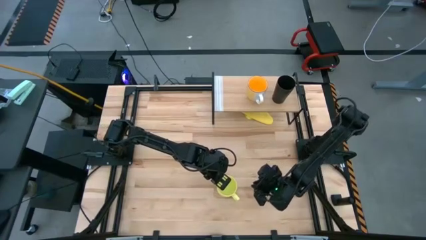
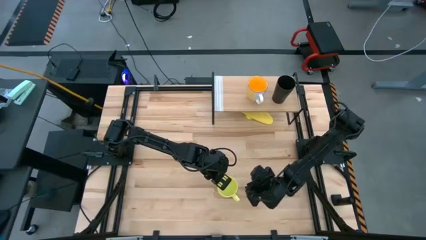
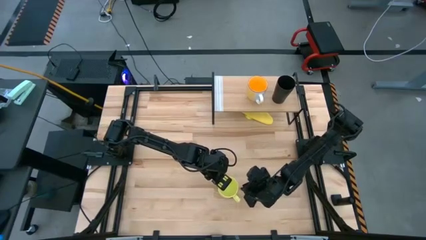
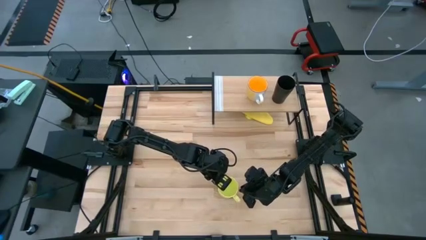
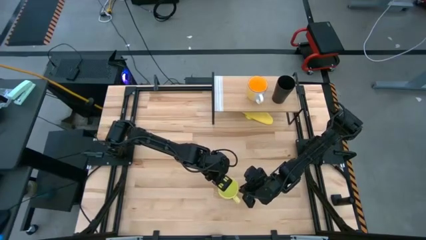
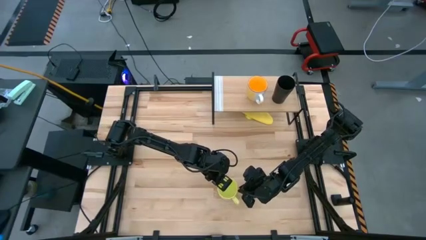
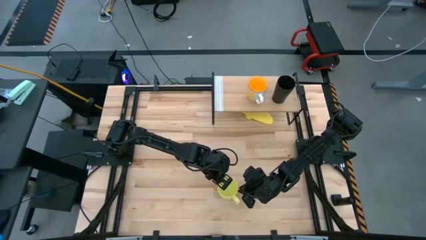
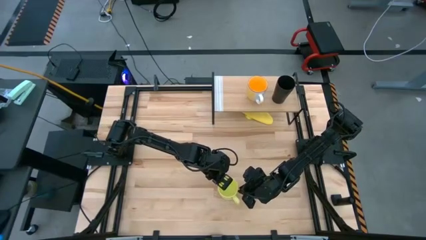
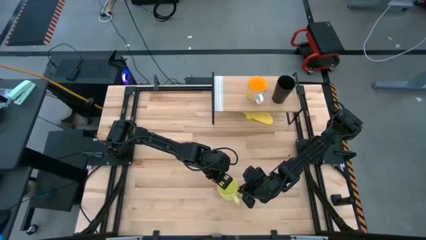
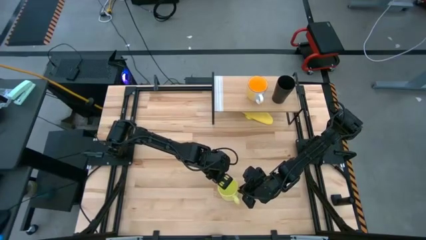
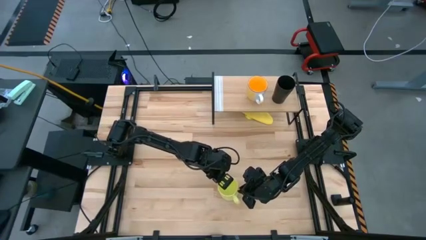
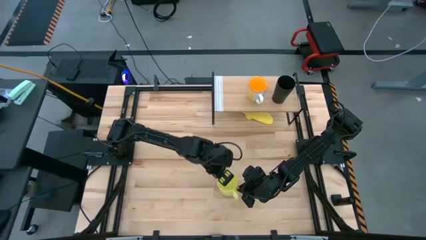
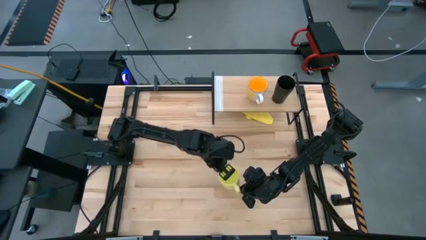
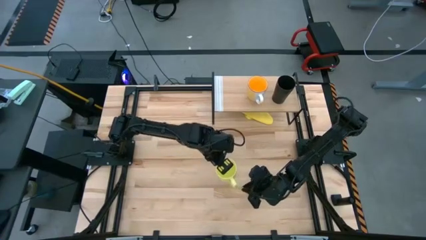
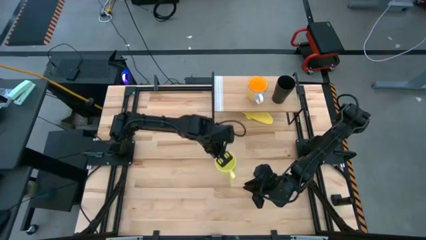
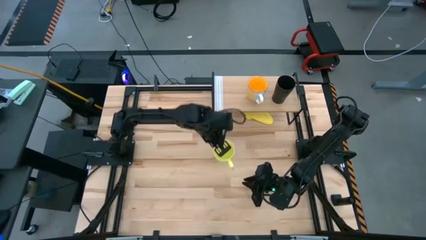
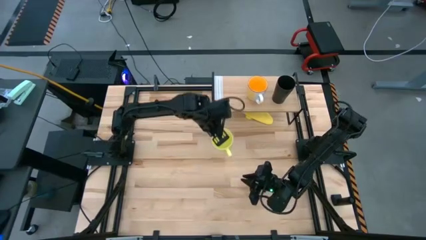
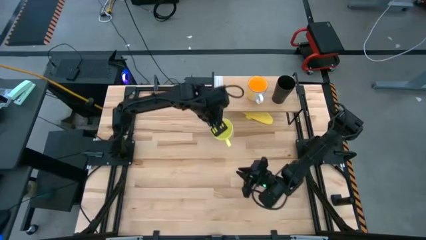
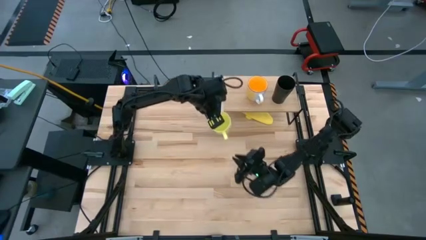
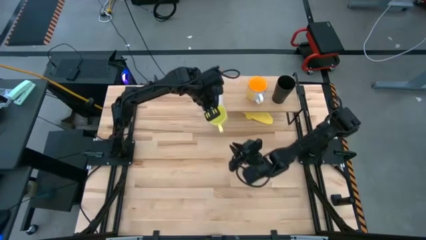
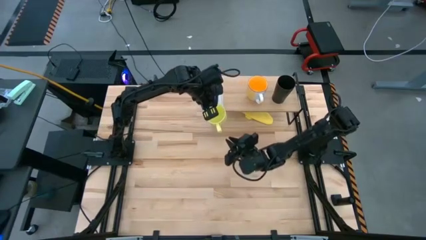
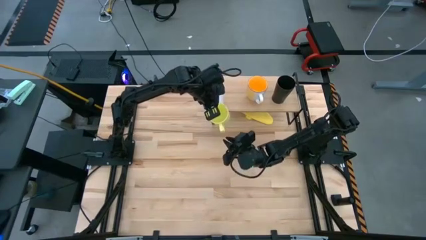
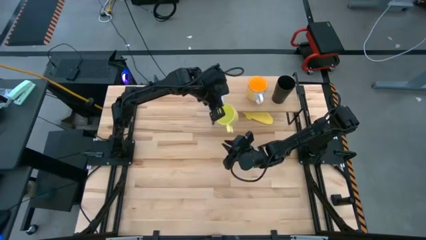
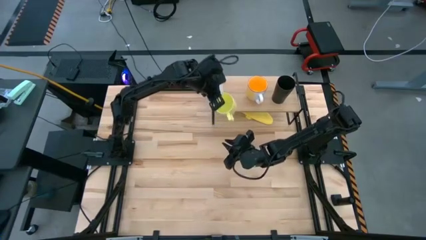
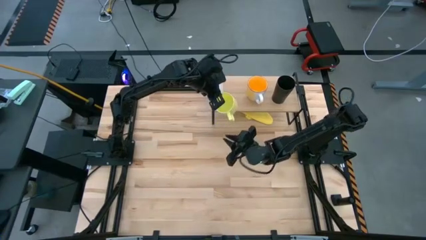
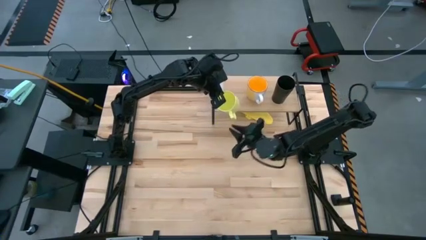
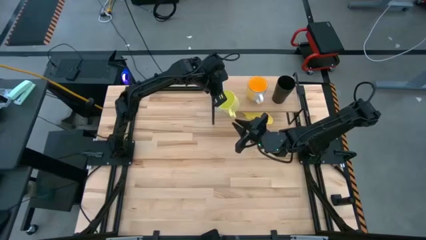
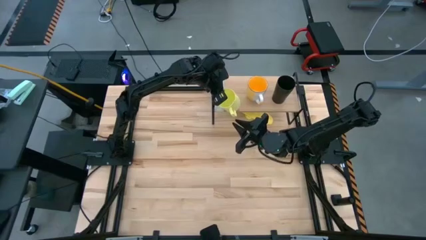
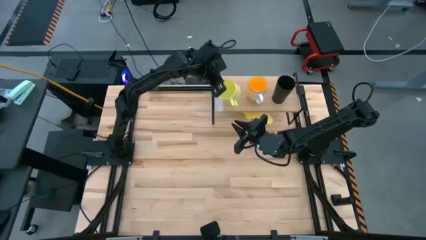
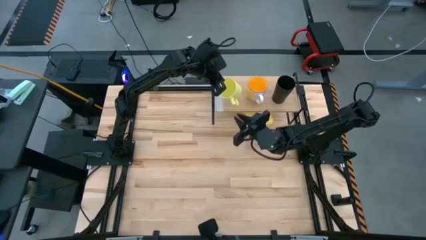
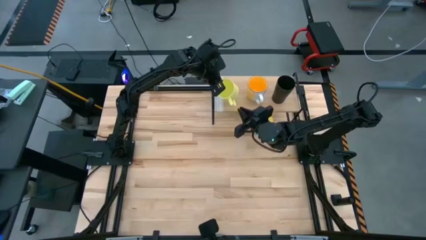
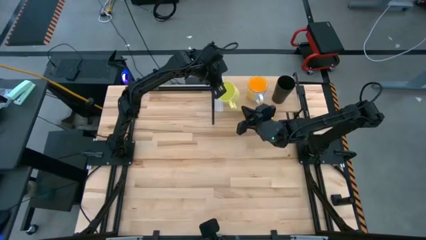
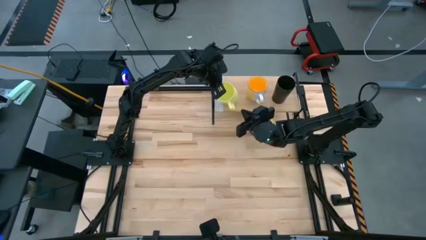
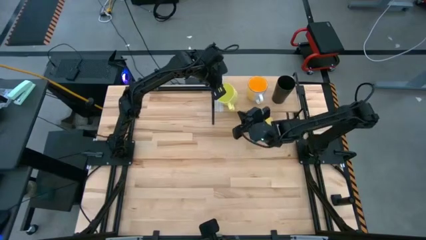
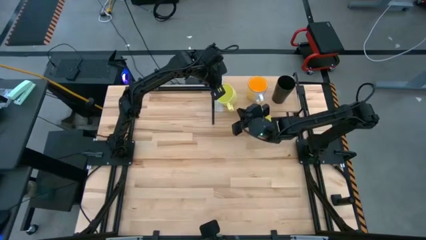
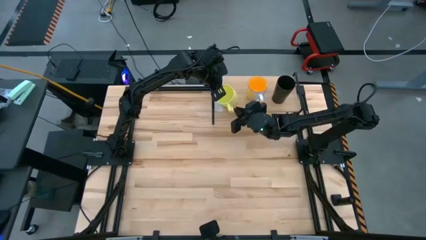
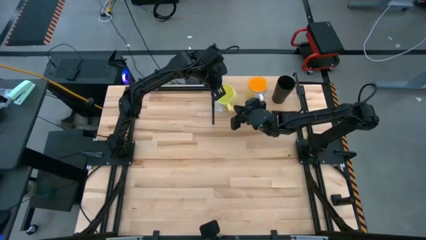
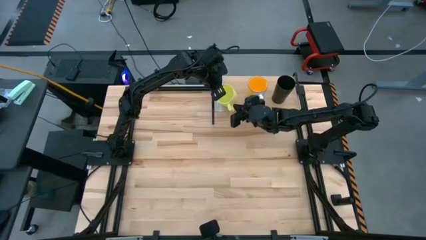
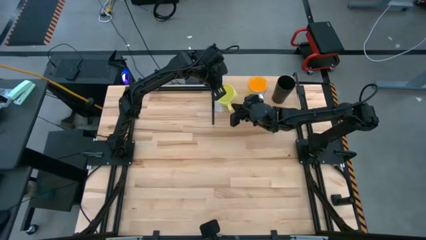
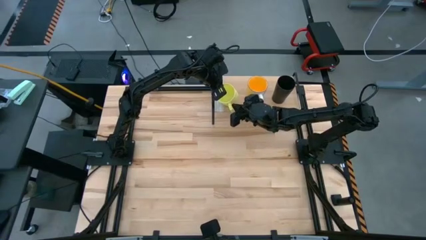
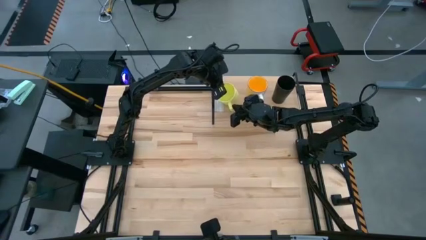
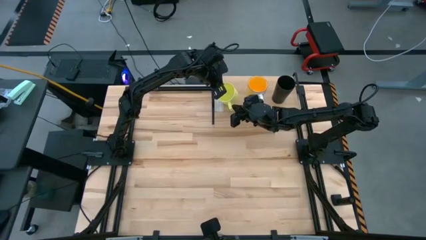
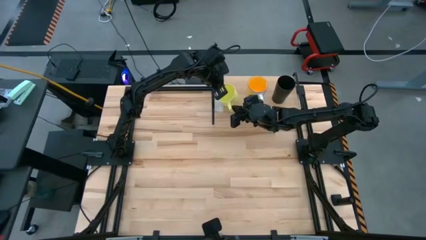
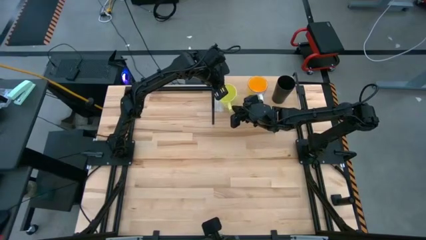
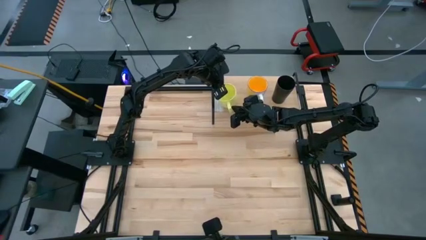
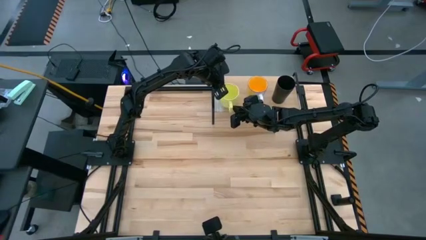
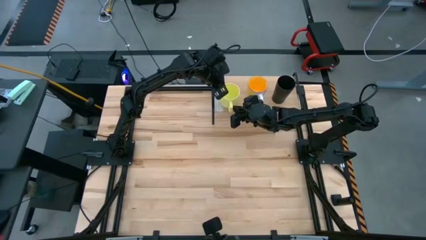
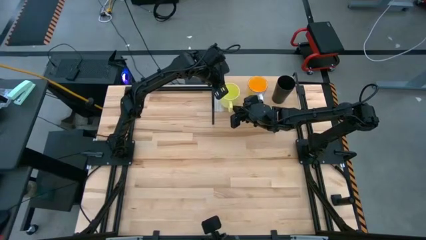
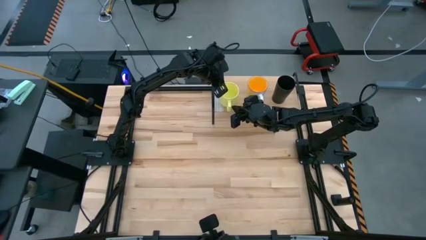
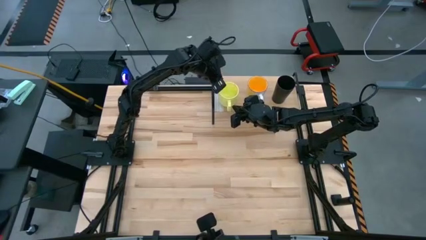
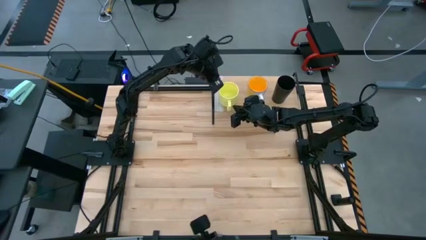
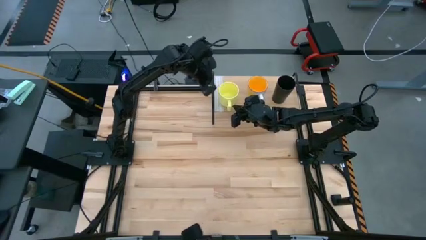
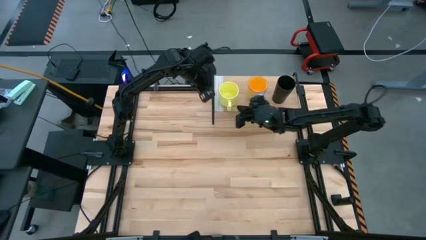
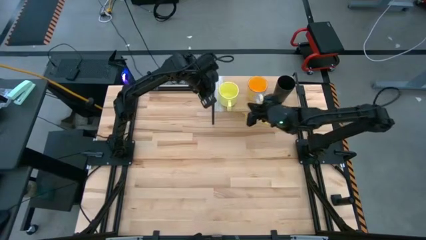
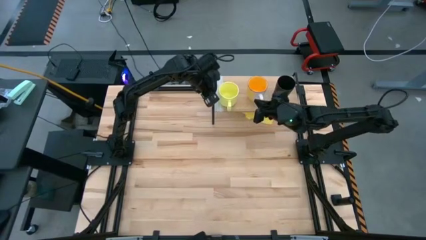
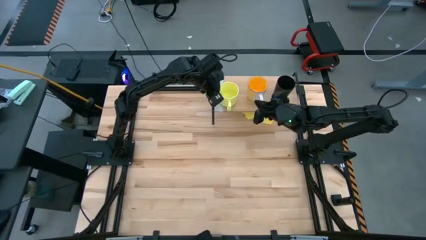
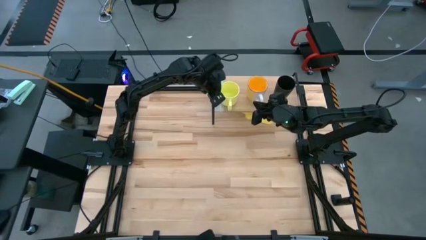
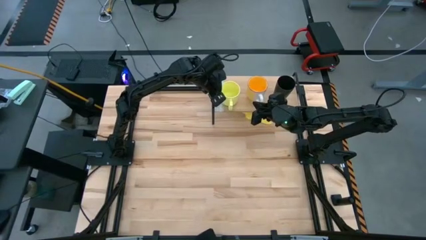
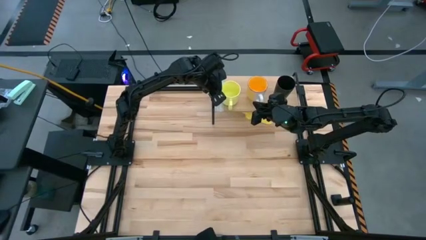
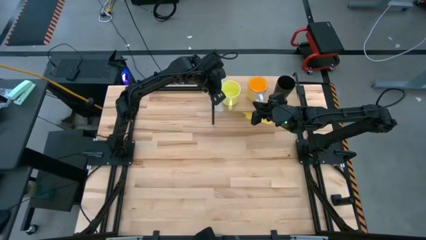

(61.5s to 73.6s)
Task: Stack small to large cups/mugs on shelf
Put the yellow mug on the shelf
